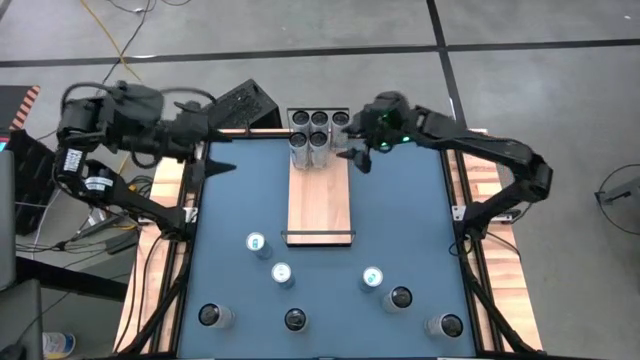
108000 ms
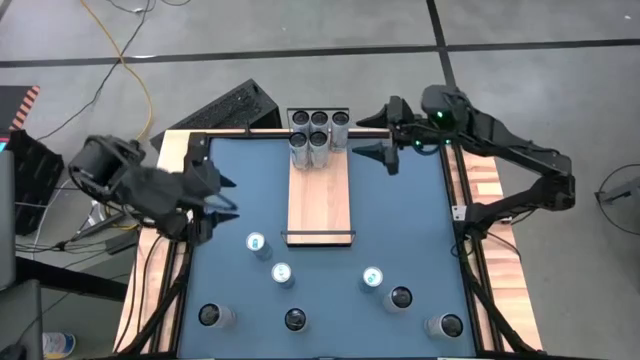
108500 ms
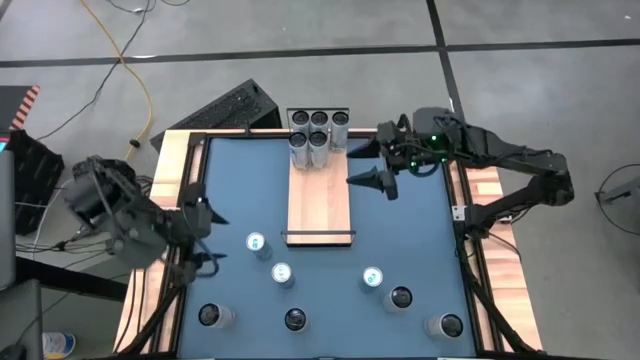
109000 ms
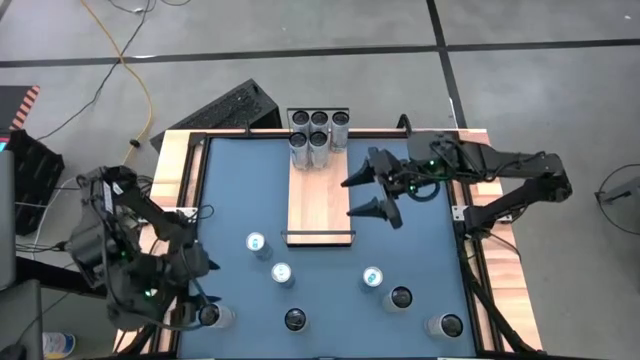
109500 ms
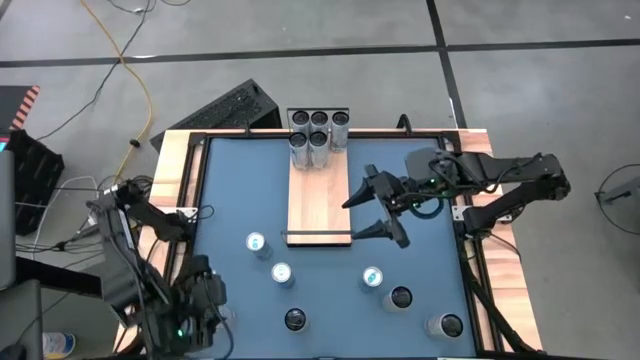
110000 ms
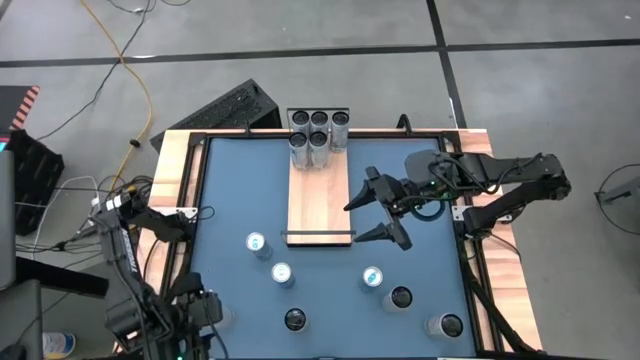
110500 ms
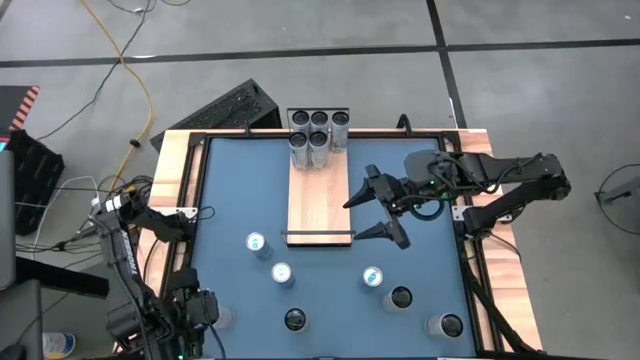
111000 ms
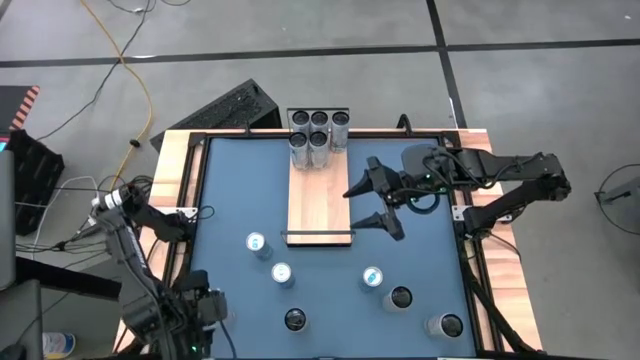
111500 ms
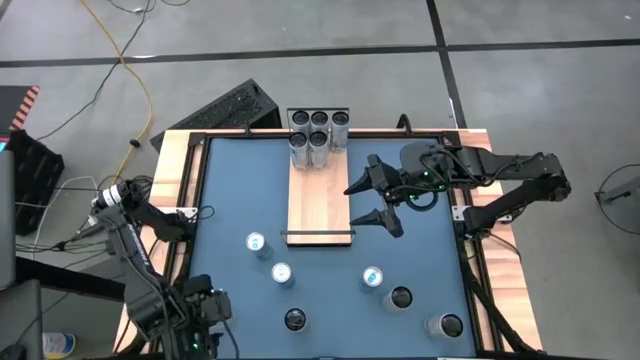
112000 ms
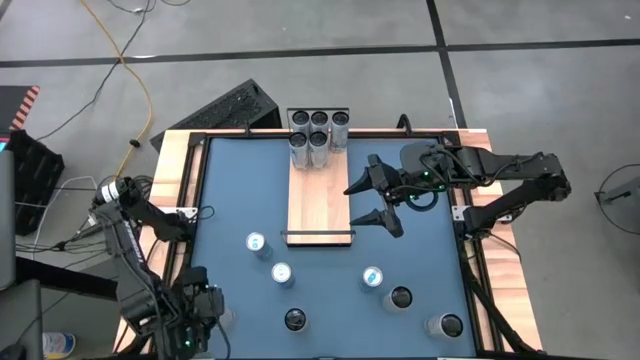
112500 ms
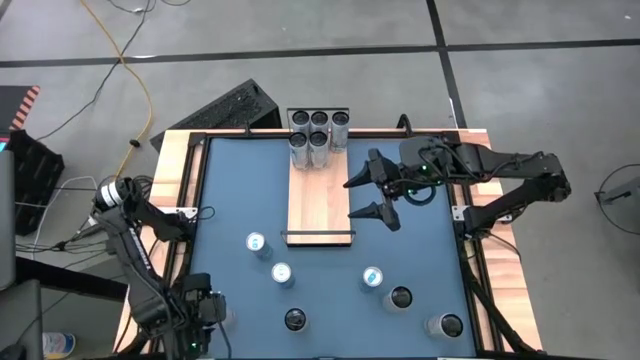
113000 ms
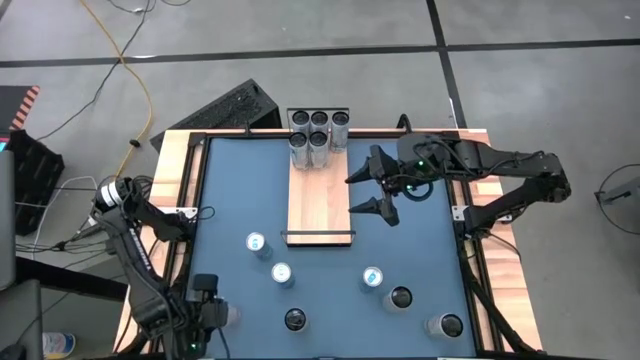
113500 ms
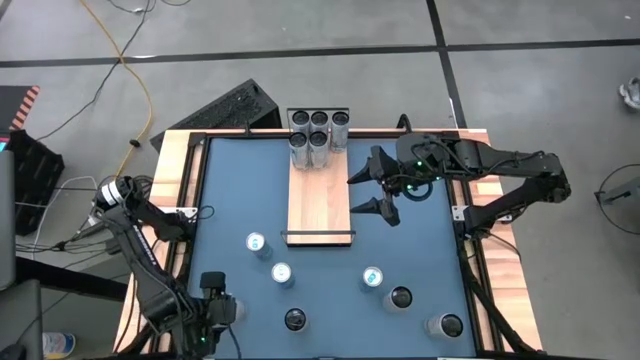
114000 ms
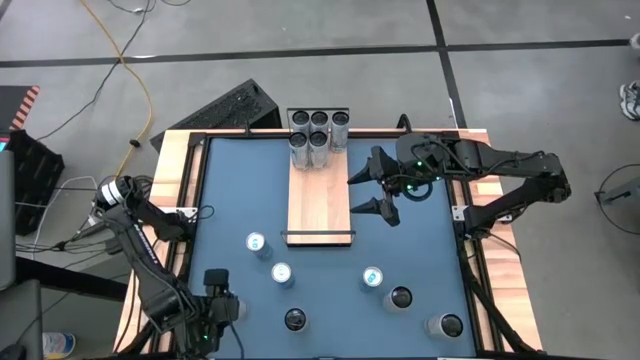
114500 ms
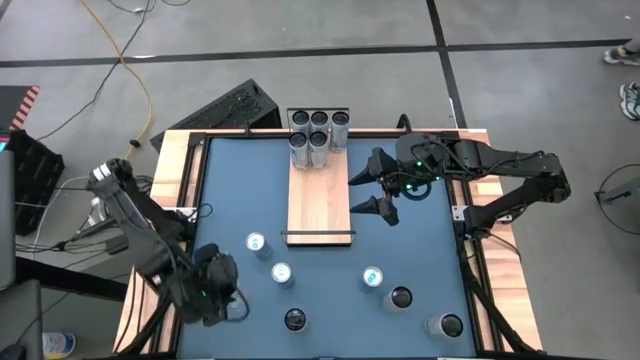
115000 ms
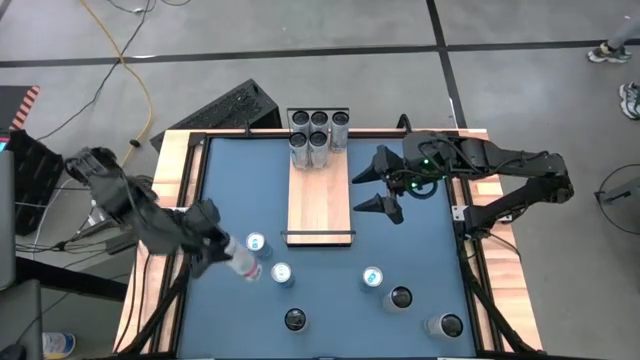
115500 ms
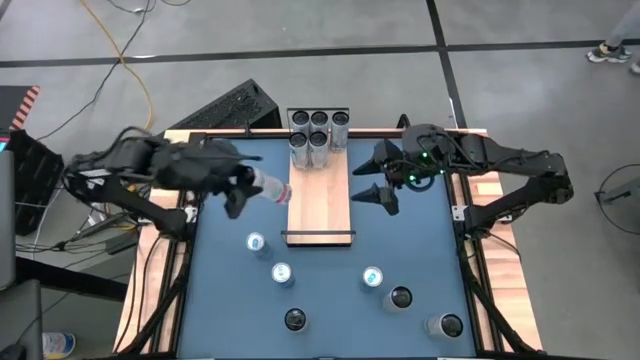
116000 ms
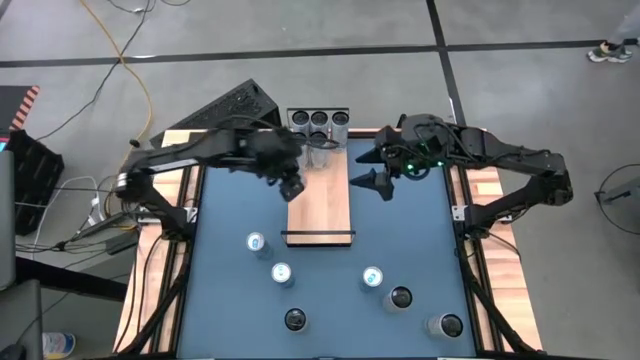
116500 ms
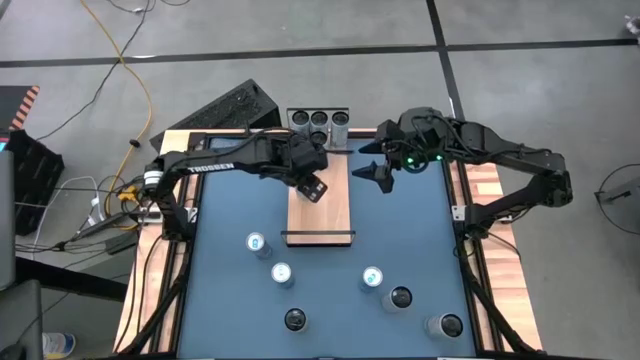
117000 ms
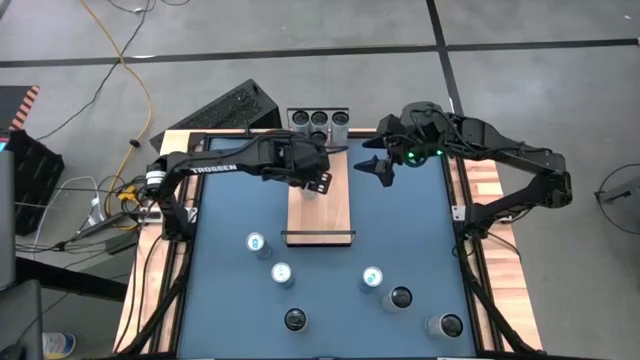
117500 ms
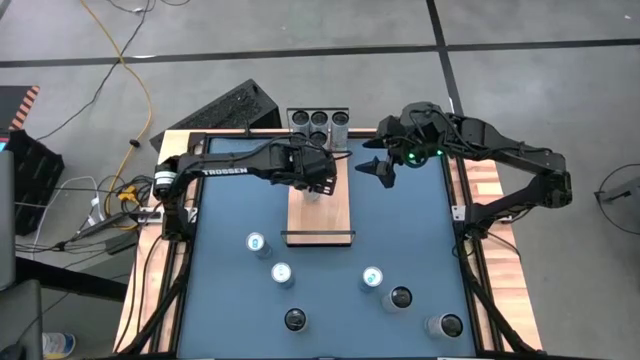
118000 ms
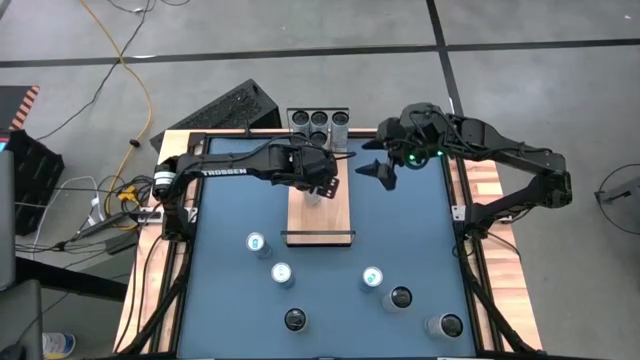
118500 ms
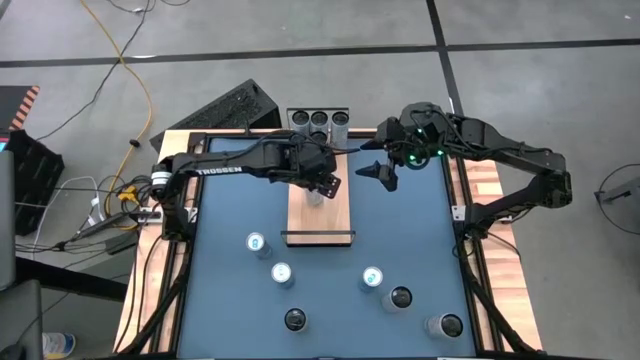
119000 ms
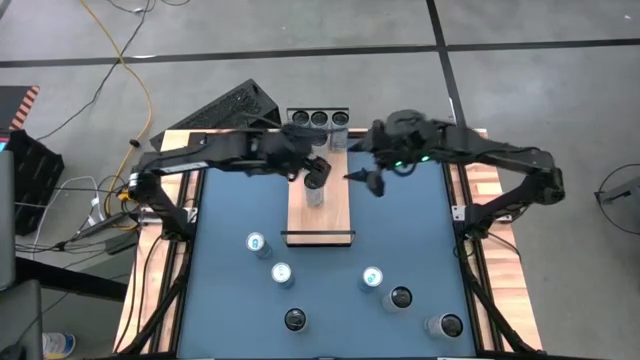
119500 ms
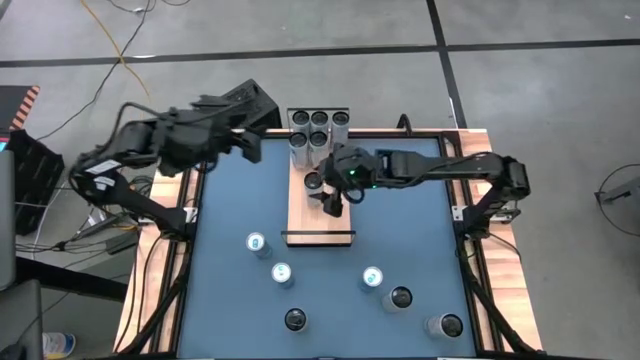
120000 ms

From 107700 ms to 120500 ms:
Task: Place canned beverage on shelf
Put the white-pink black soda can on the shelf

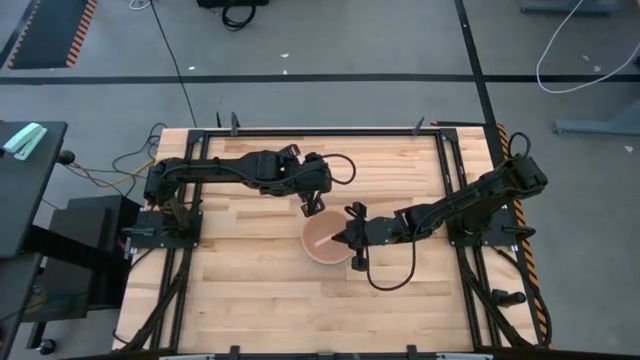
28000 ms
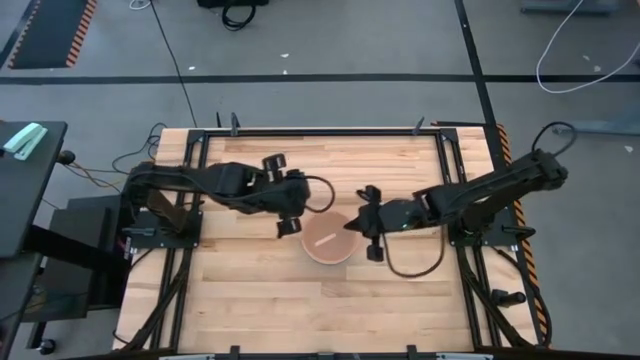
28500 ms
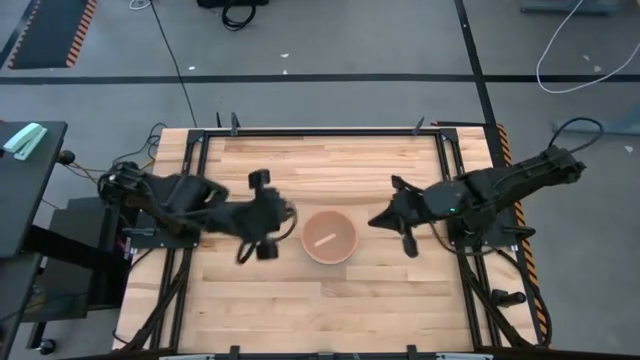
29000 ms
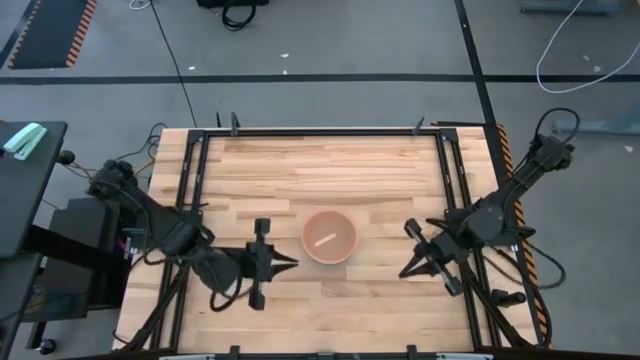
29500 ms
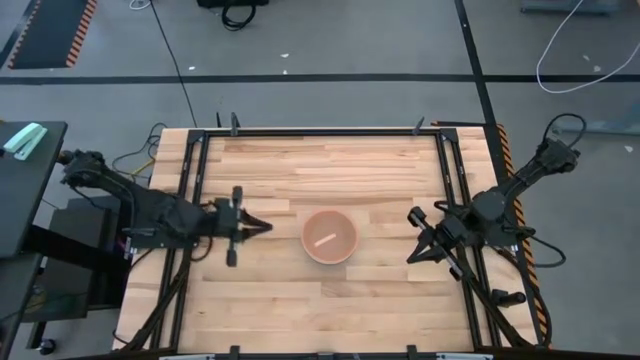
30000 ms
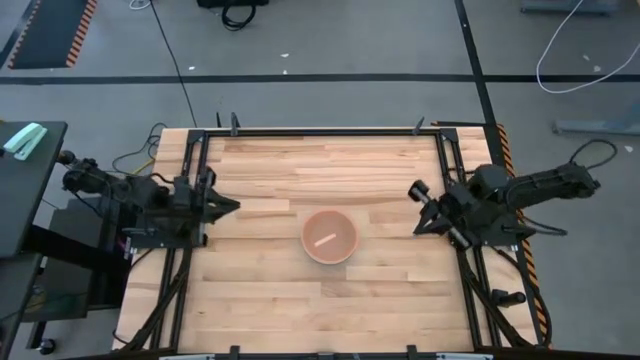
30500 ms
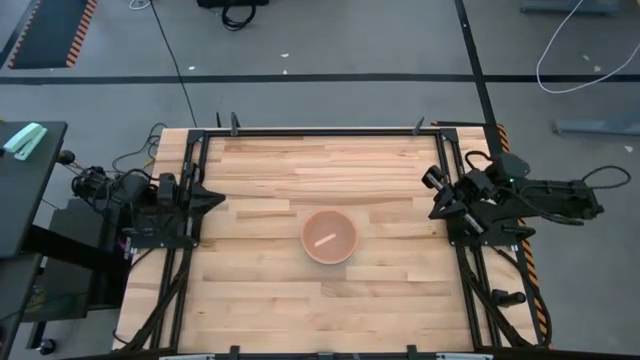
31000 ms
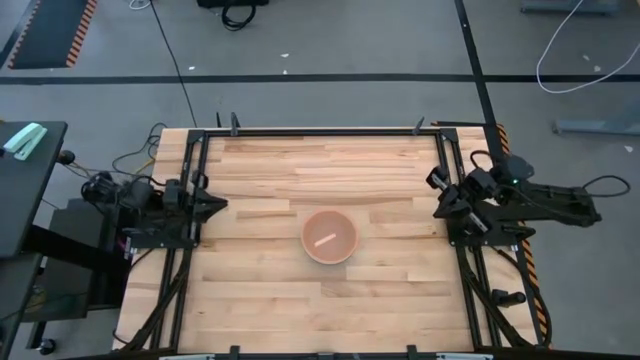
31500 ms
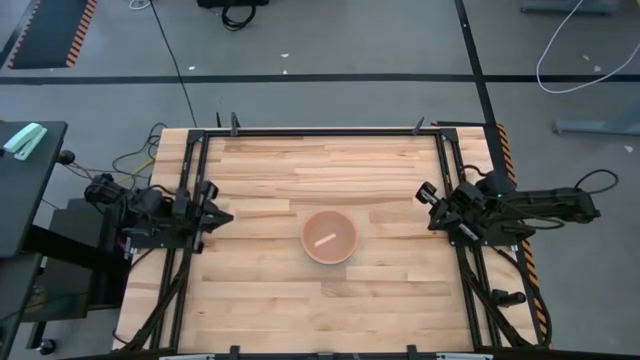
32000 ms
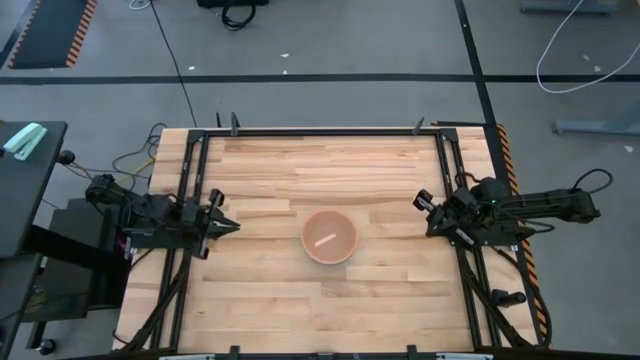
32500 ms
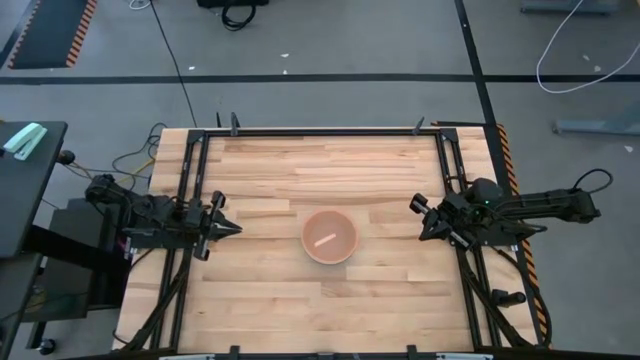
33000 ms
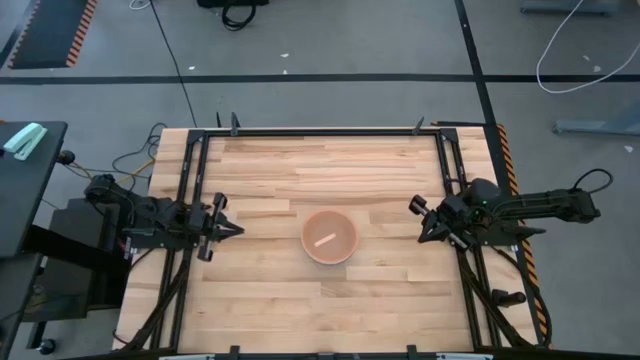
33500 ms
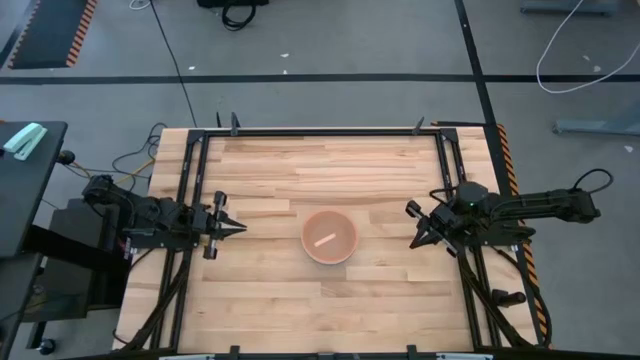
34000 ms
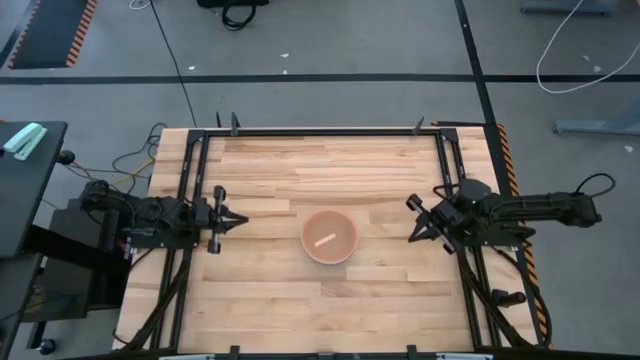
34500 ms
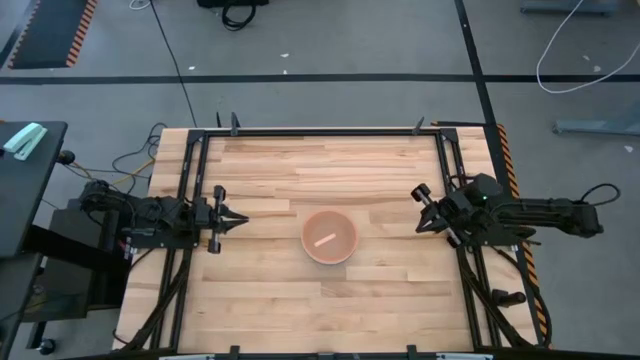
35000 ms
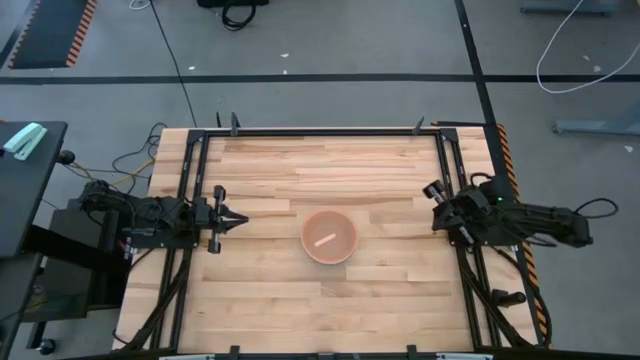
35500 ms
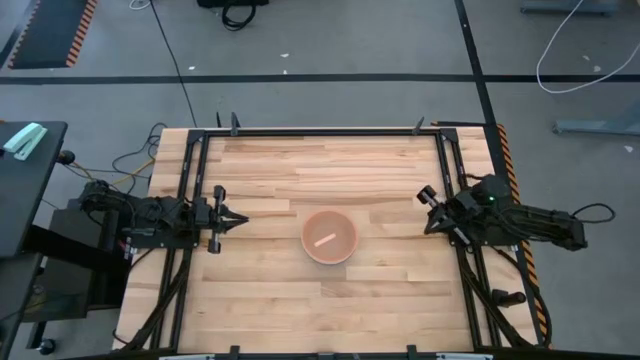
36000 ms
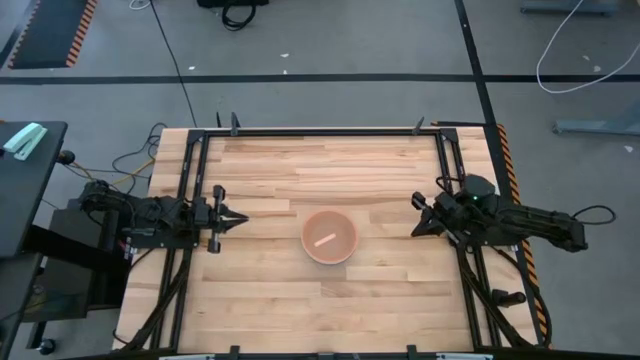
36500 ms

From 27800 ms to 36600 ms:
Task: Nest bowls inside each other
Return to Home Position
